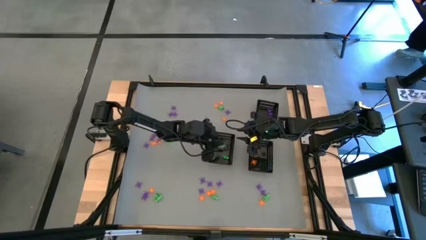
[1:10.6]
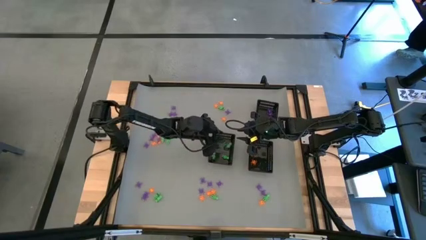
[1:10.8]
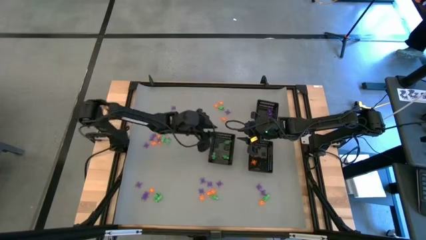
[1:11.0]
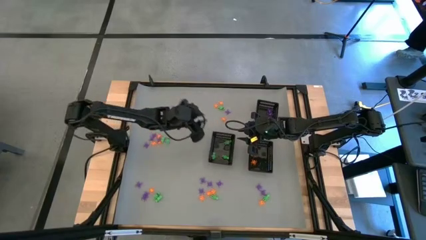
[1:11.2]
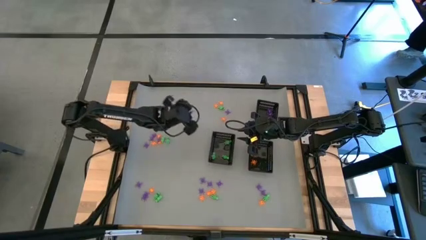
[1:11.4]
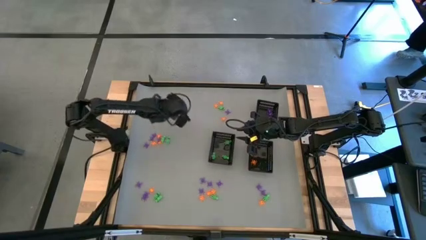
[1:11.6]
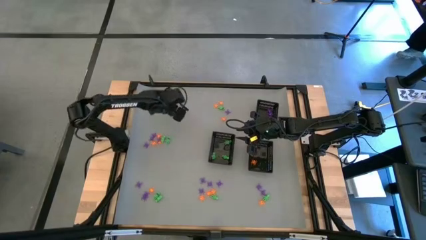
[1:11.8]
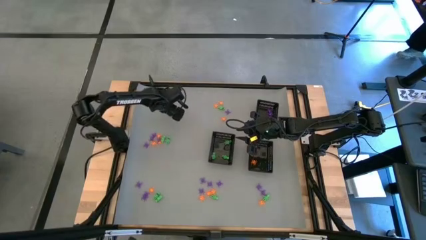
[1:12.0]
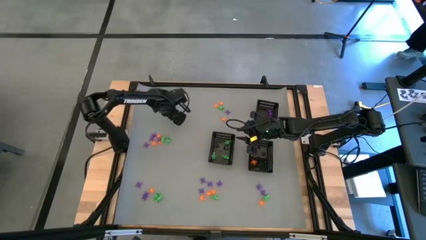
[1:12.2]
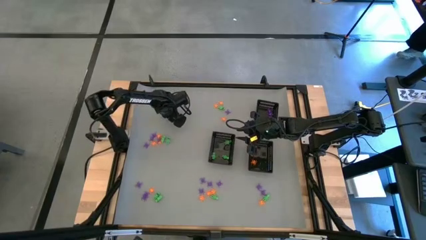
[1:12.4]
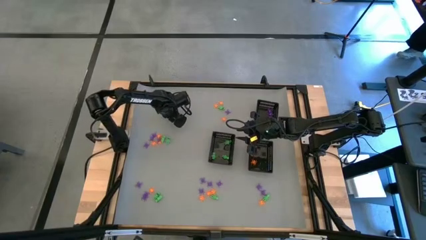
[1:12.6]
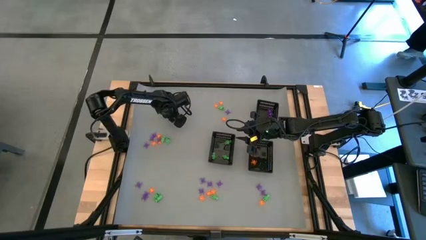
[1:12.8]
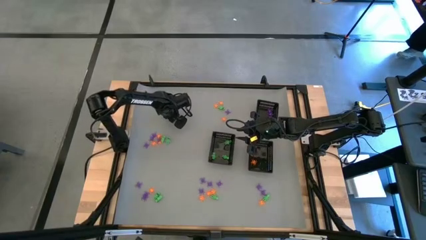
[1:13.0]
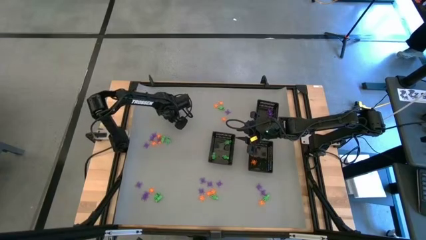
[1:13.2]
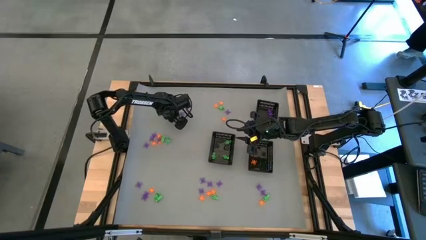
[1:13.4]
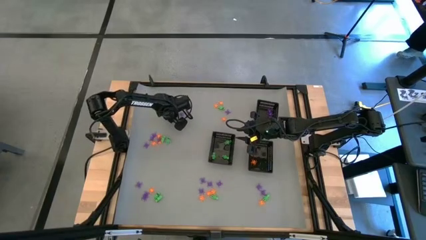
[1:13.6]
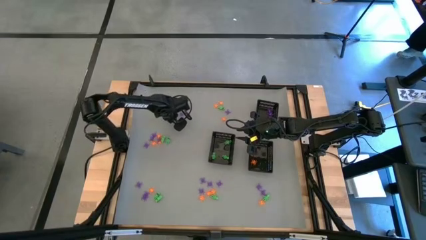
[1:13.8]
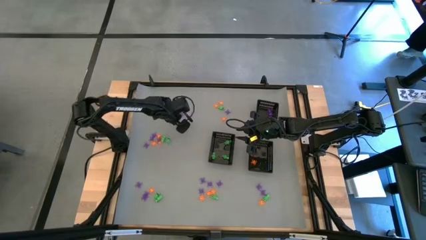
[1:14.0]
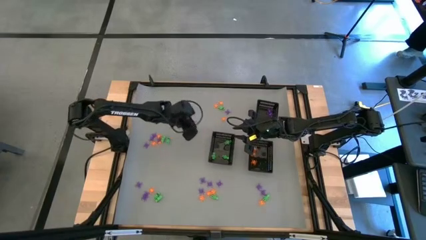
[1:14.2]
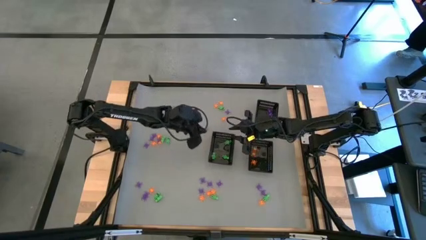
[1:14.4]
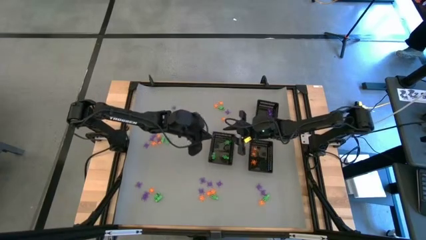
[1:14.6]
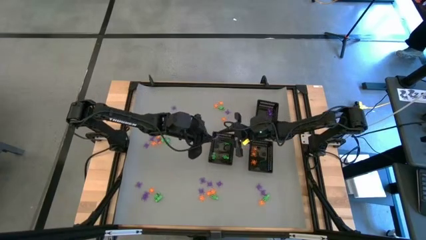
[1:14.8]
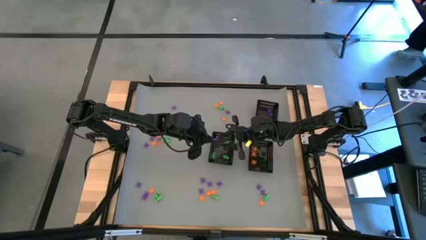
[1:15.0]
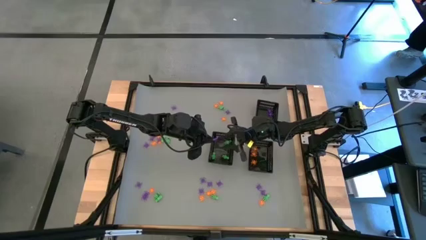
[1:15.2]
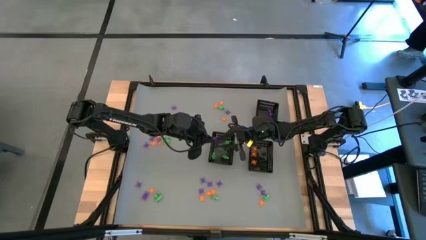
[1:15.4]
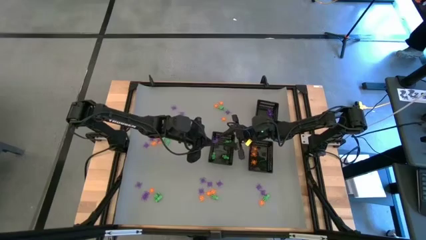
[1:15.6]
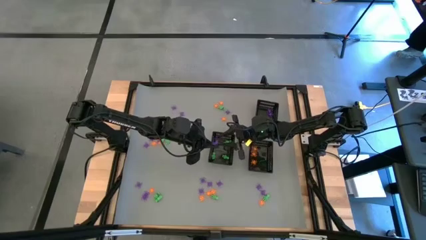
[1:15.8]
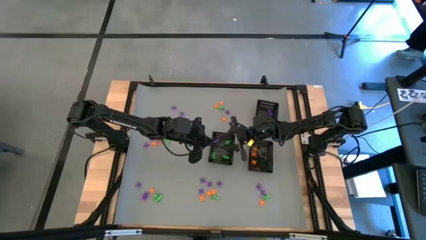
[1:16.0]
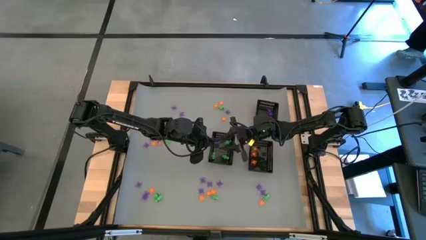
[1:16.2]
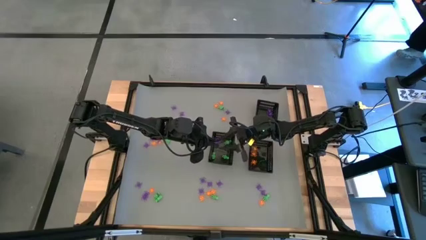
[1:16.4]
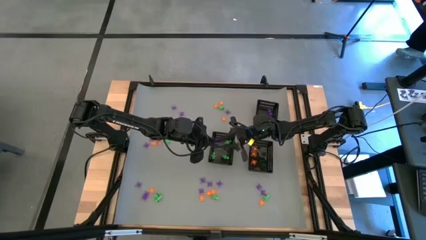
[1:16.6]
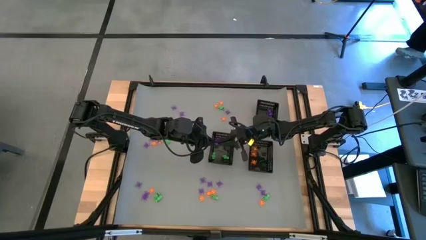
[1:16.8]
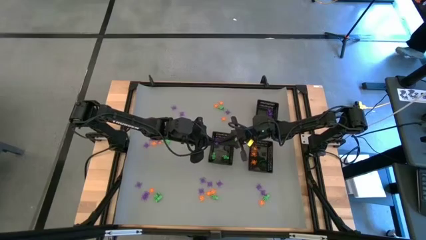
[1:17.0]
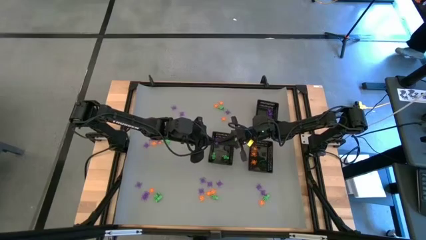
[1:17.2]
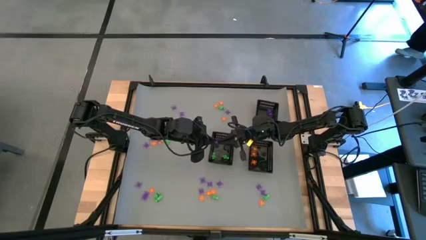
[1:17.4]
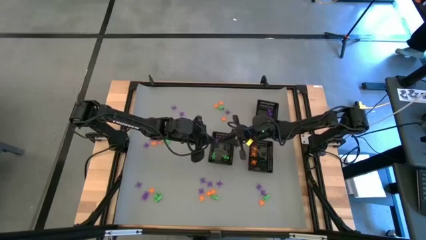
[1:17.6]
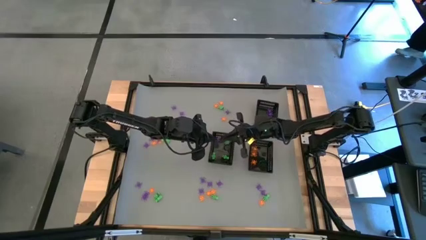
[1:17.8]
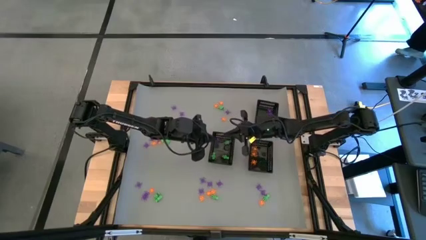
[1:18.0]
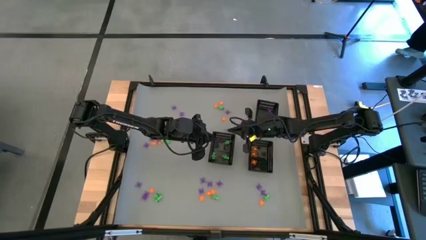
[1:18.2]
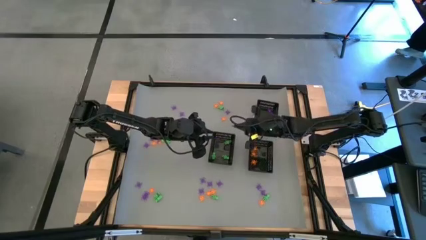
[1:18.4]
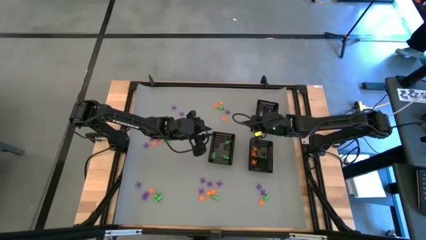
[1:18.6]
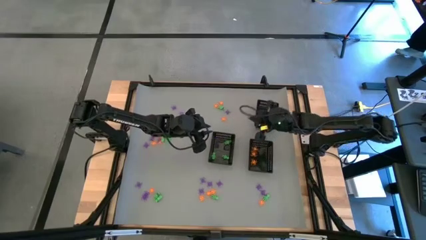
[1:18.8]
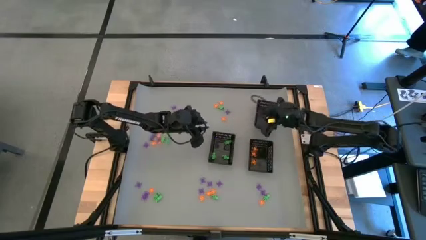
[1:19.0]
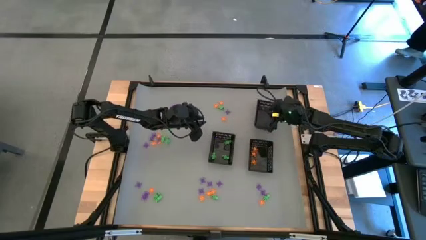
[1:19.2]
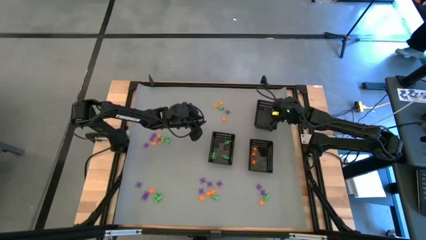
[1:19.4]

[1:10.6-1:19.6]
Task: Sort Halloween decoration
Put the purple spider toy into the top bin

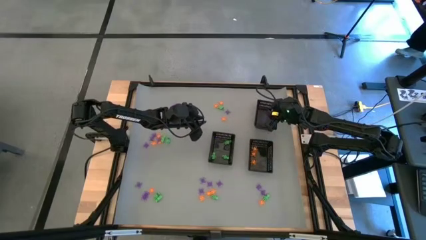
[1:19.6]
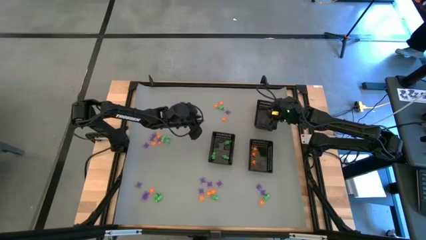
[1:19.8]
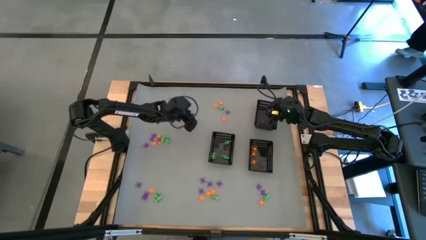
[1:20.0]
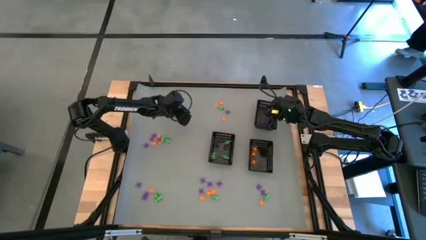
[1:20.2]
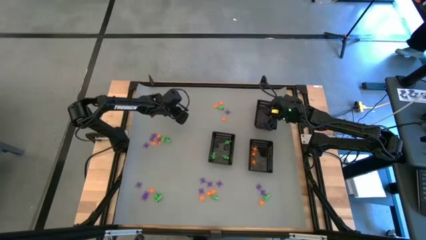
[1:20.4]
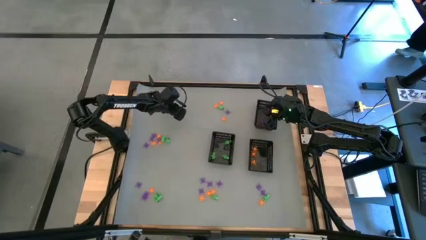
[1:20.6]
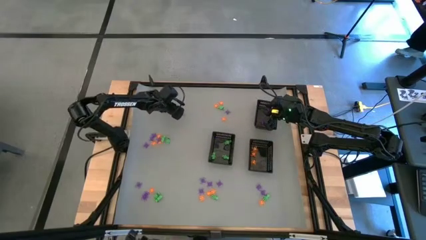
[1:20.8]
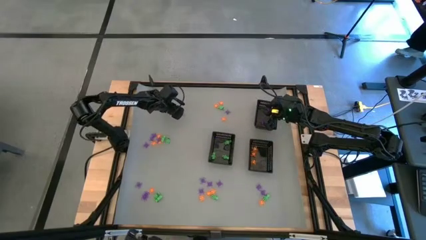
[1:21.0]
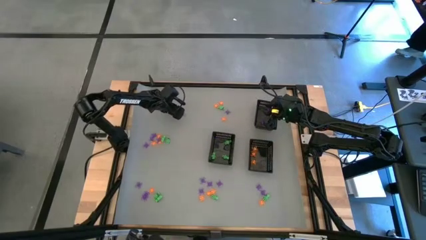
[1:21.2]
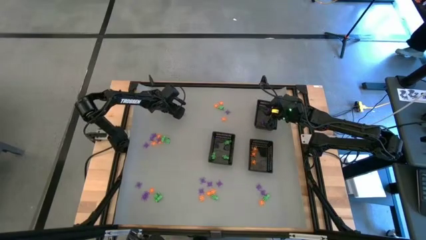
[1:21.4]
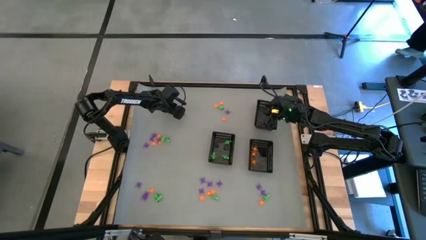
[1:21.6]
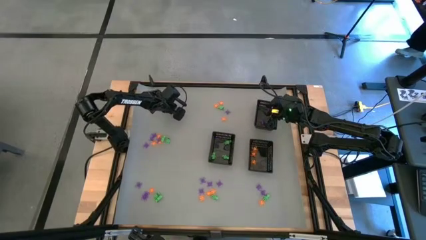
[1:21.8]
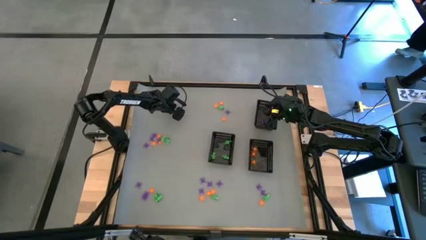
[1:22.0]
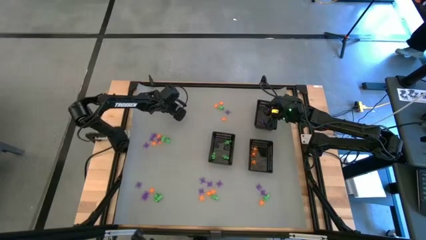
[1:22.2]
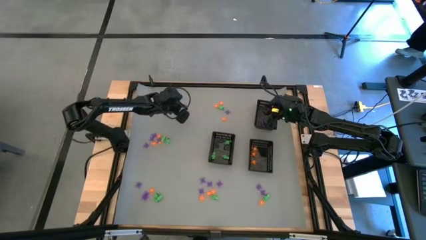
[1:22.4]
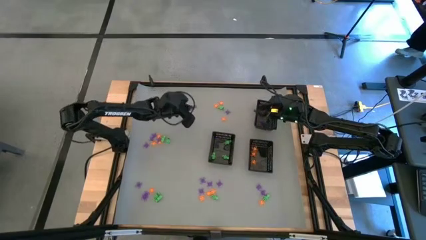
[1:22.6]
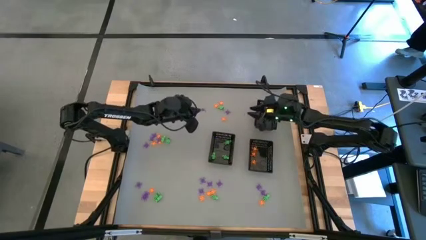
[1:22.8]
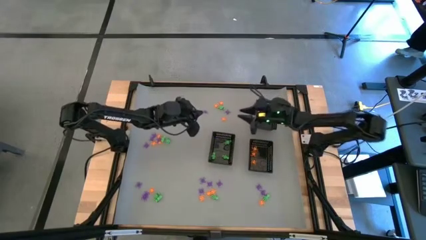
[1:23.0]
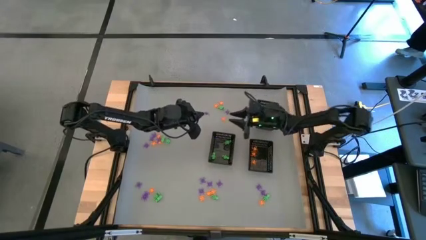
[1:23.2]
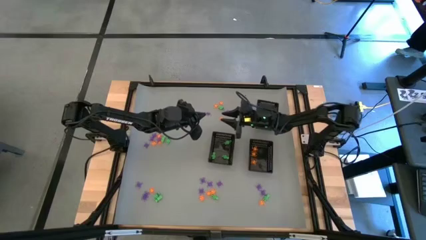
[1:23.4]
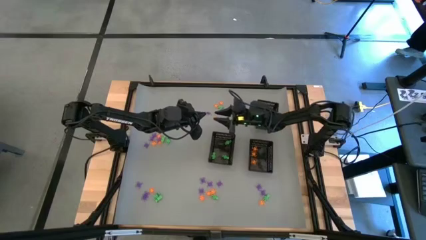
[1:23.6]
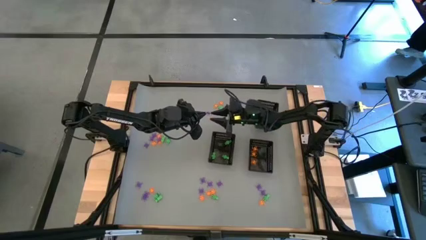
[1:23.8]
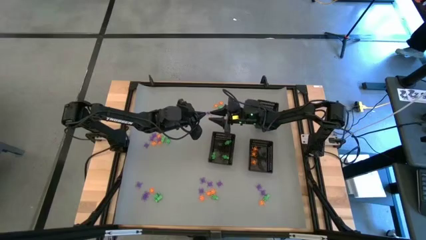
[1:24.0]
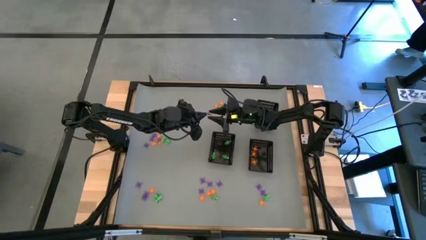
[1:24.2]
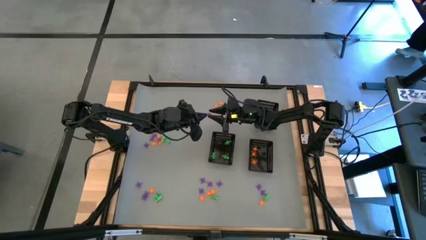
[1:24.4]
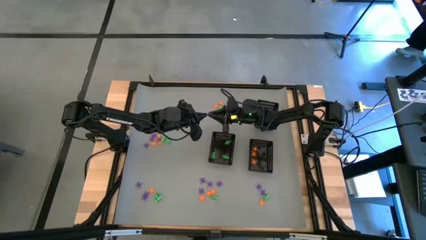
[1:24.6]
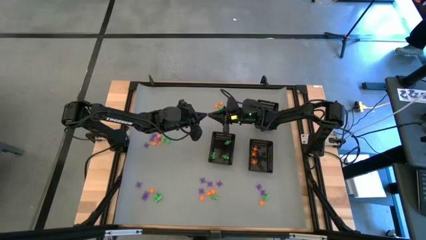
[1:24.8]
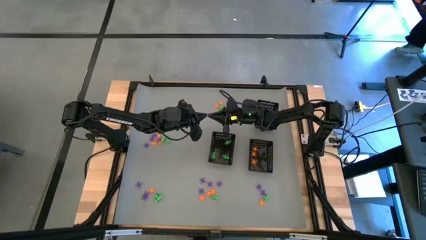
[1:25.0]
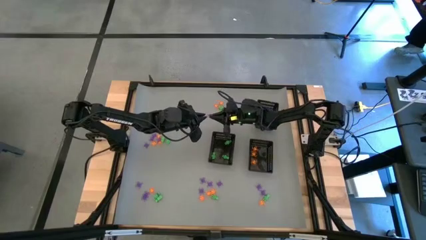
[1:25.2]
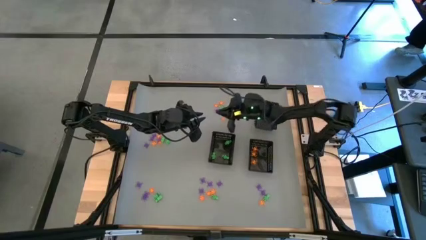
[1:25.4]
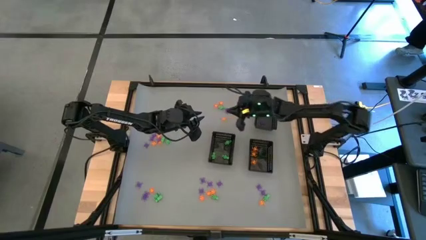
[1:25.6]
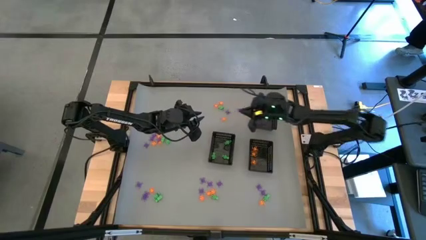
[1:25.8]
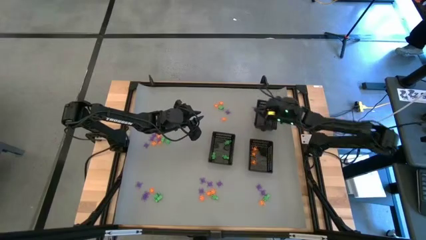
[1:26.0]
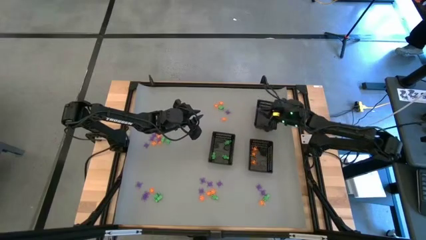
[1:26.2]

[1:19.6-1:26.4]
Put the purple spider toy into the top bin
